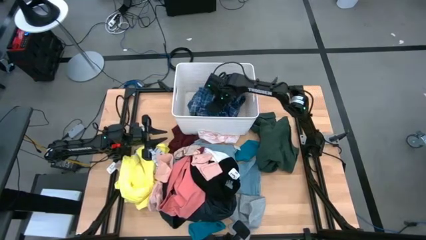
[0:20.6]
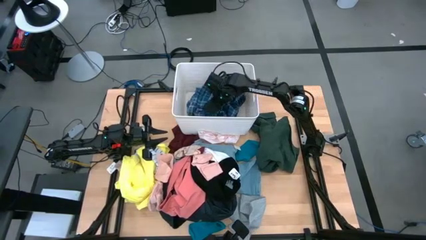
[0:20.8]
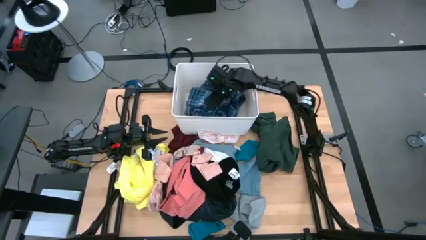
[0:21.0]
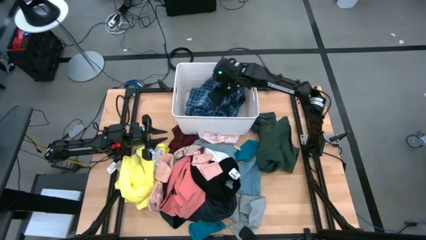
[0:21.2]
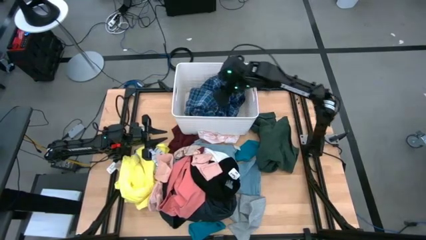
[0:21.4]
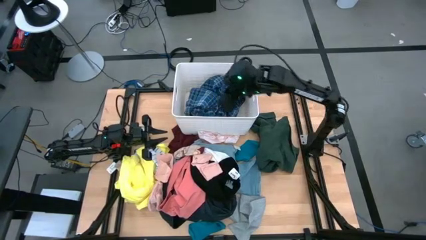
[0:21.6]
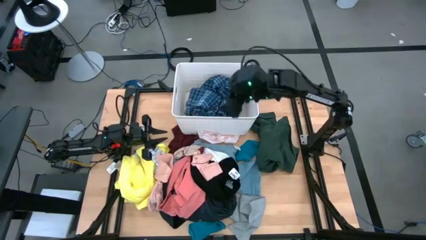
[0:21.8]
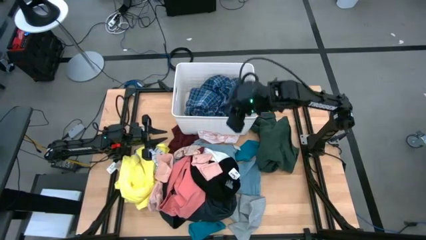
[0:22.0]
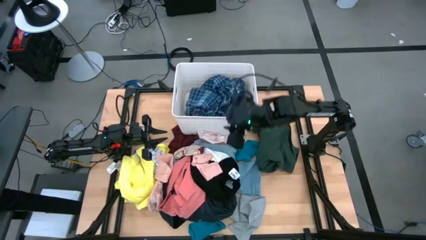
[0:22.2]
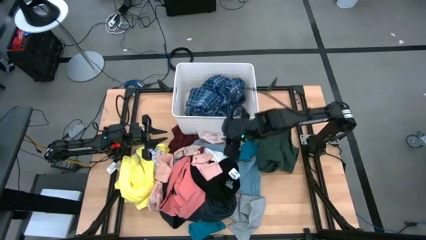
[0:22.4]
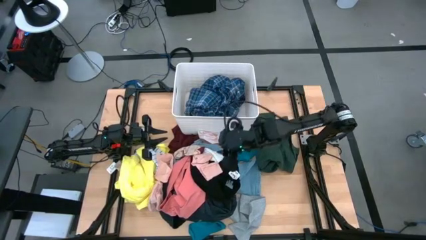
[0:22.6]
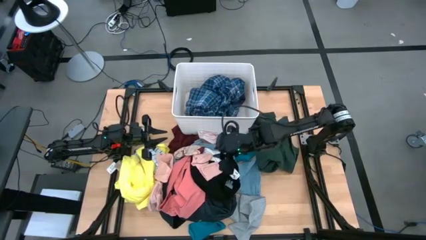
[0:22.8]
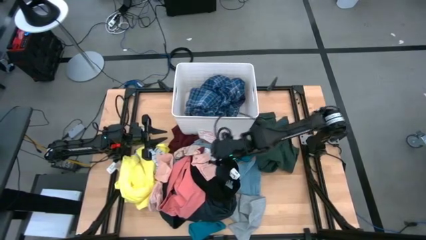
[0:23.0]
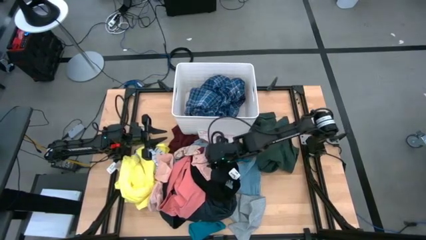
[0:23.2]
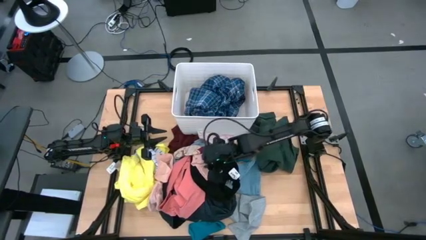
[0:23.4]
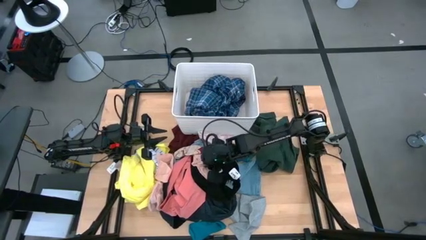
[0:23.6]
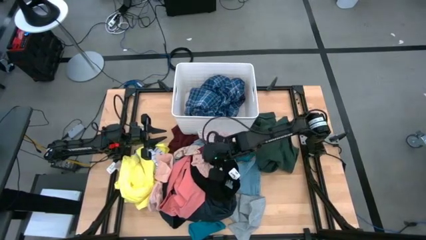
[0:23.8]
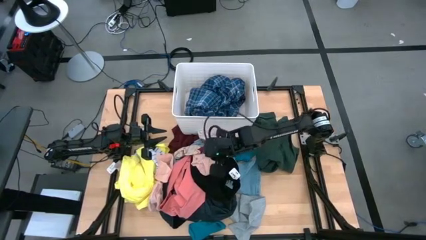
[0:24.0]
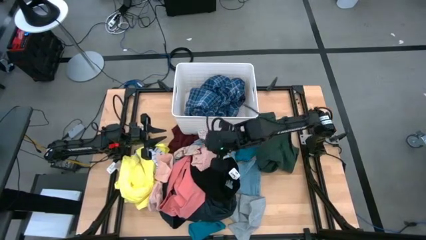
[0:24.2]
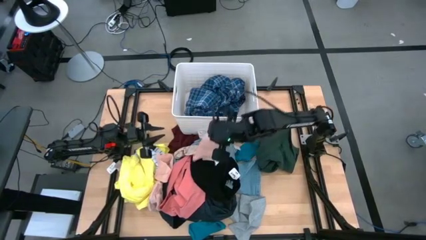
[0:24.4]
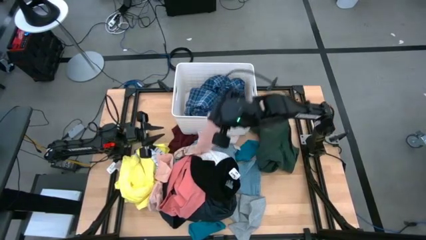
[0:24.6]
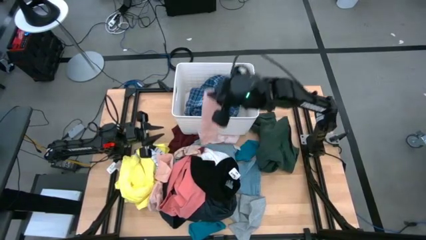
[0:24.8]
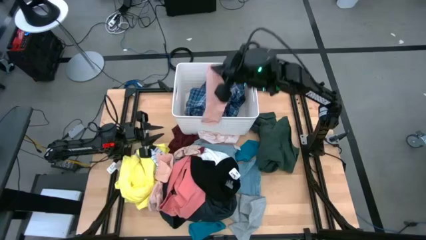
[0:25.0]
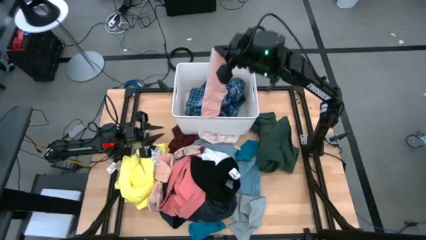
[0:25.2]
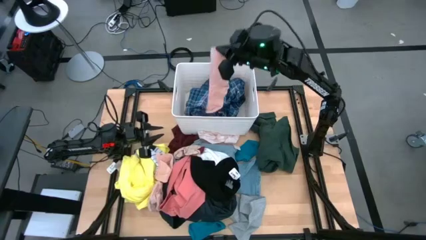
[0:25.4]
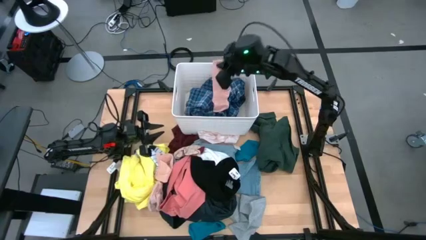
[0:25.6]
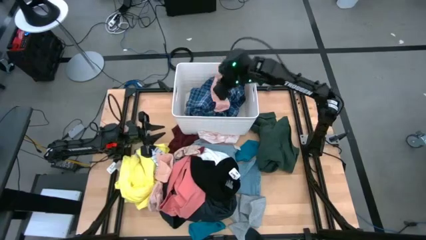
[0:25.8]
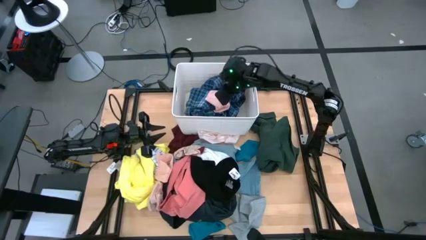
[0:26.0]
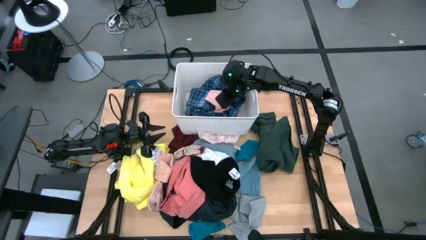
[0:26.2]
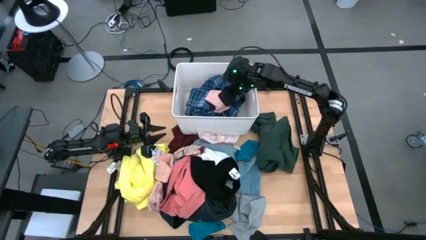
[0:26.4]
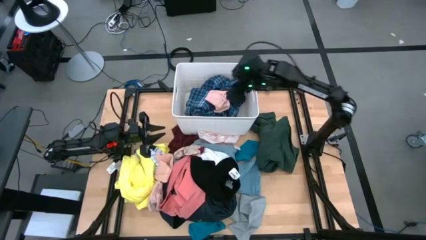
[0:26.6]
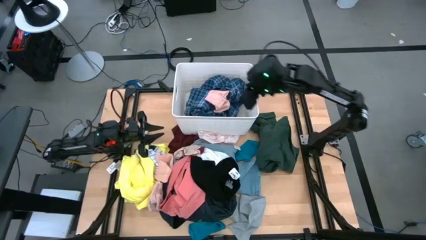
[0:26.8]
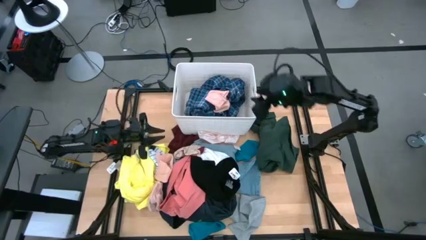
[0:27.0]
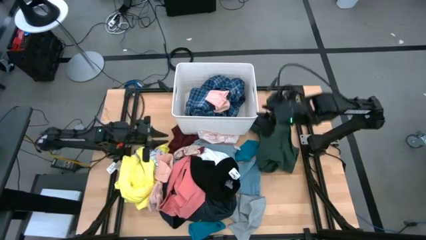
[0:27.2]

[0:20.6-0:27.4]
Task: Sort clothes
Put the right pink sock into the white laundry bin

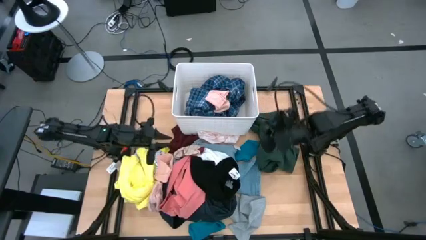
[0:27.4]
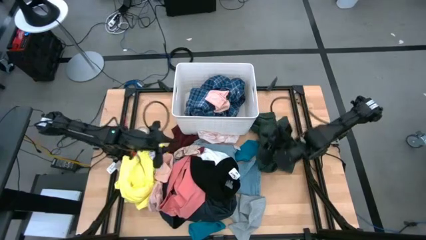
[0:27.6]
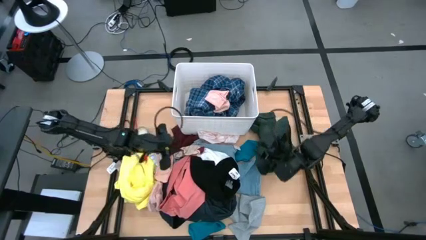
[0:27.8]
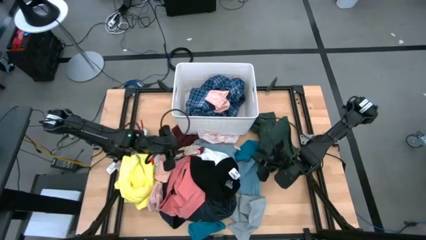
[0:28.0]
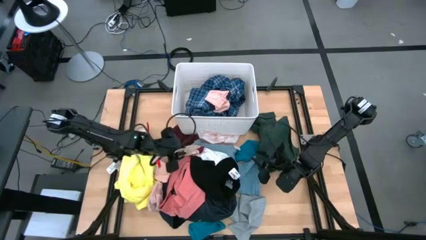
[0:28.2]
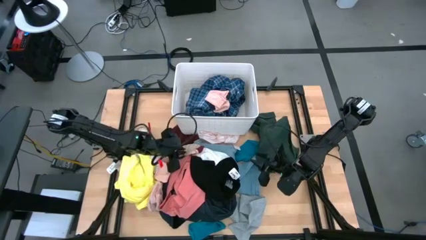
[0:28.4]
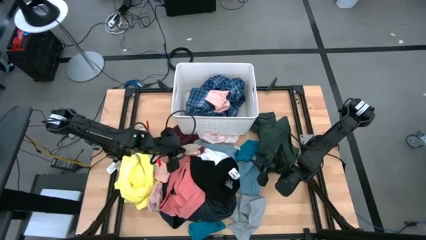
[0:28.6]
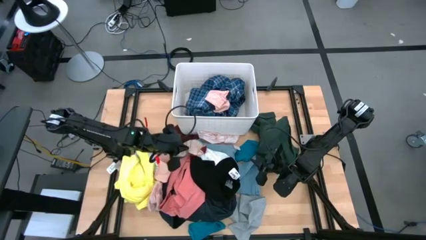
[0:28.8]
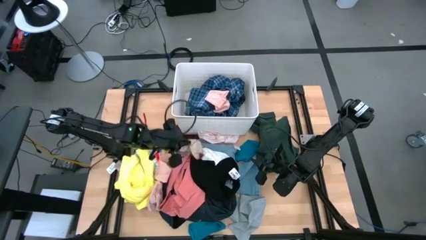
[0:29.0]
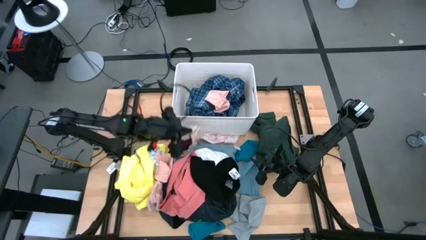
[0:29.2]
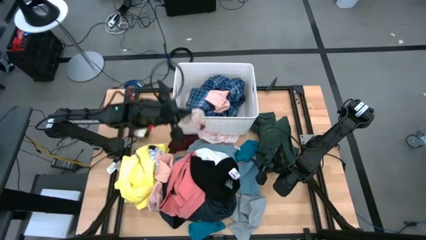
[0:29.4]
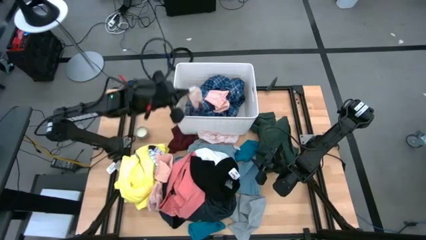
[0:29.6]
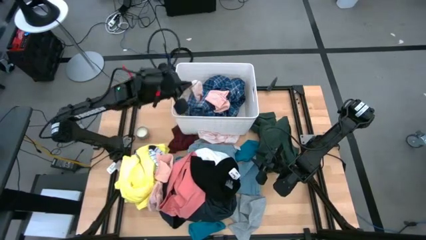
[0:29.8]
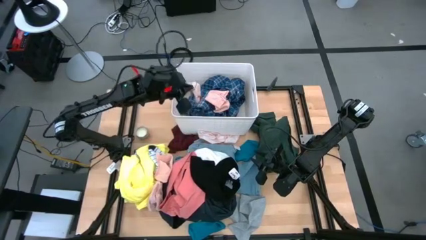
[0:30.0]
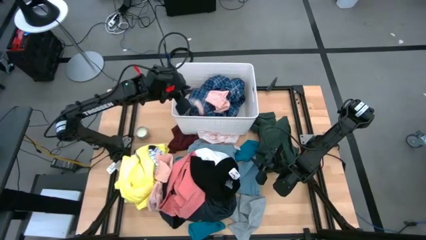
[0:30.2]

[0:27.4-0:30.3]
Put the right white striped sock into the white laundry bin

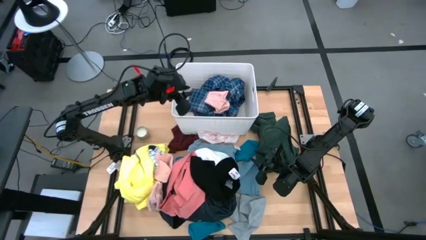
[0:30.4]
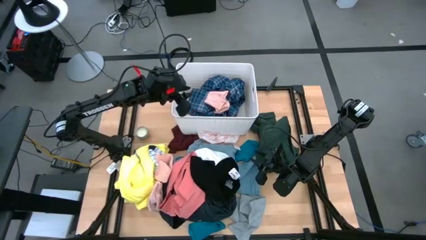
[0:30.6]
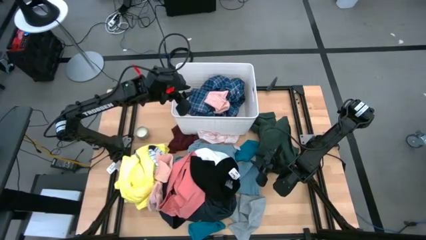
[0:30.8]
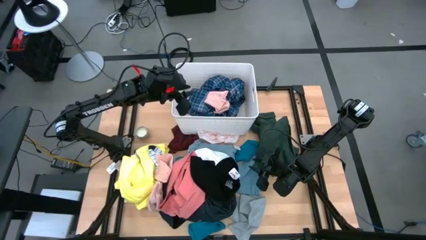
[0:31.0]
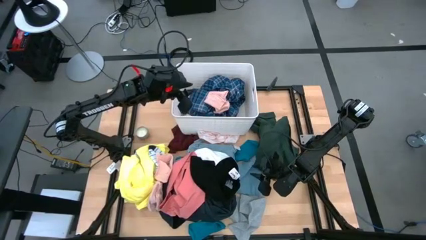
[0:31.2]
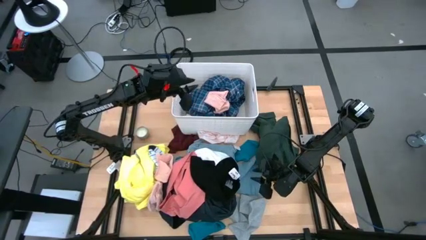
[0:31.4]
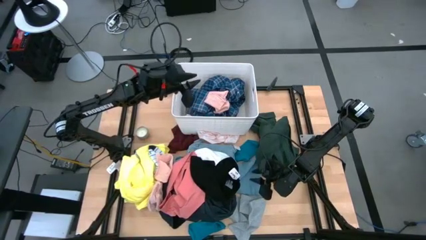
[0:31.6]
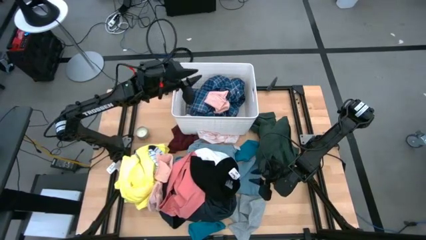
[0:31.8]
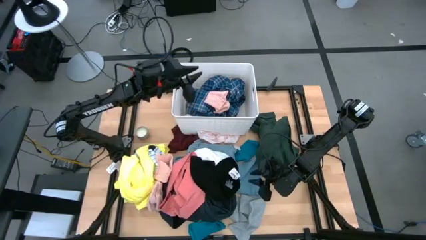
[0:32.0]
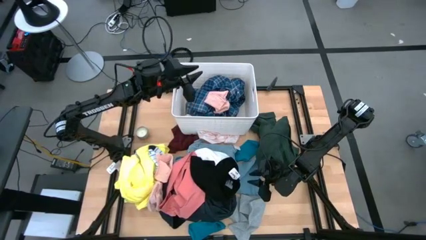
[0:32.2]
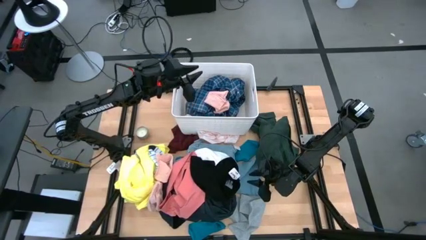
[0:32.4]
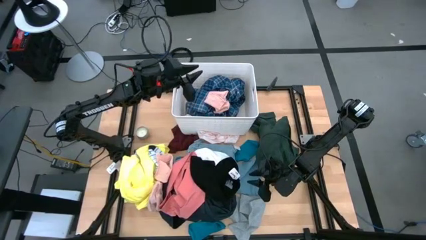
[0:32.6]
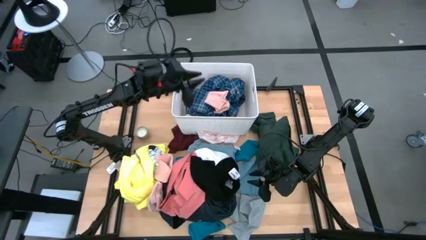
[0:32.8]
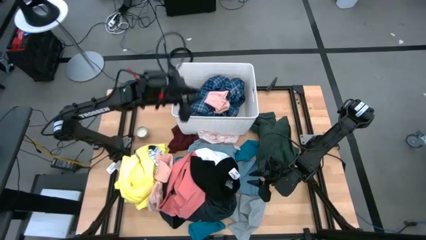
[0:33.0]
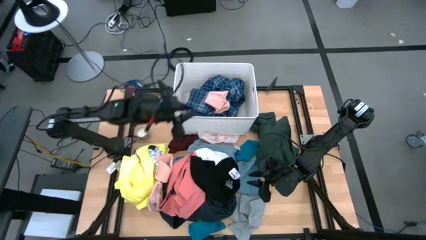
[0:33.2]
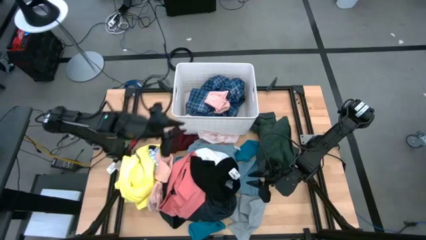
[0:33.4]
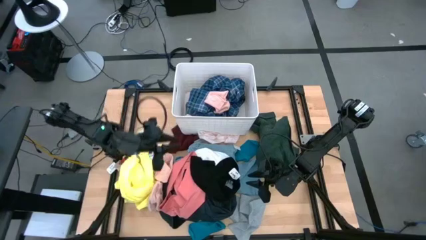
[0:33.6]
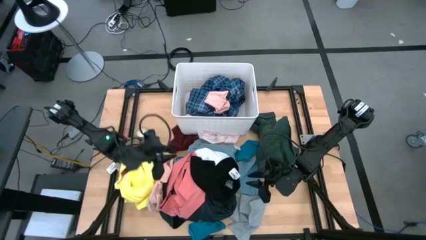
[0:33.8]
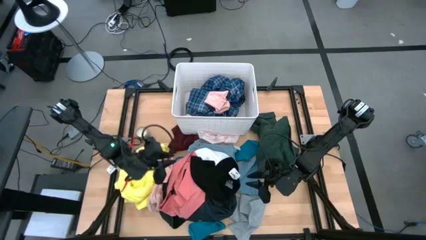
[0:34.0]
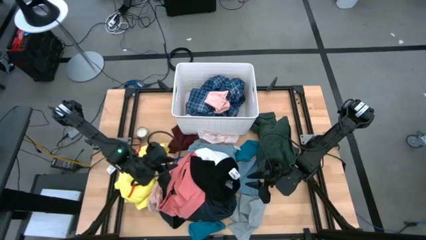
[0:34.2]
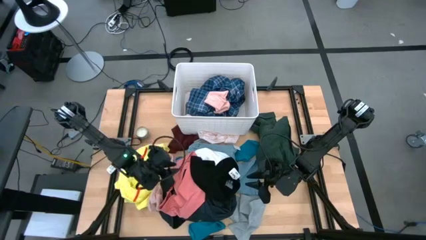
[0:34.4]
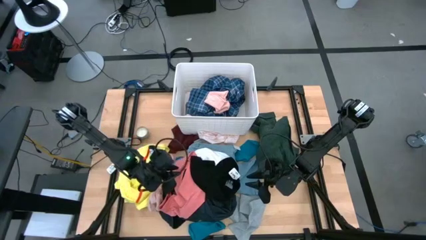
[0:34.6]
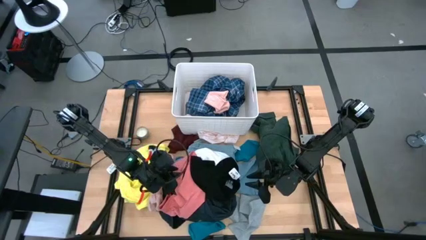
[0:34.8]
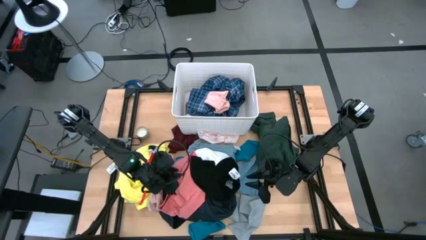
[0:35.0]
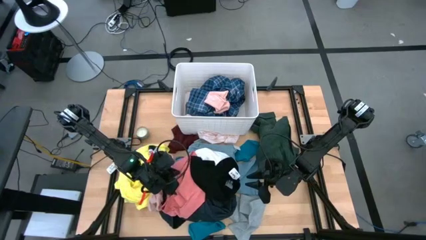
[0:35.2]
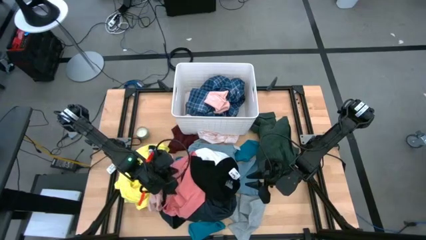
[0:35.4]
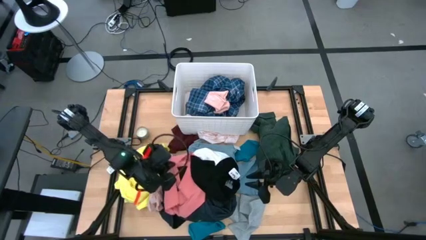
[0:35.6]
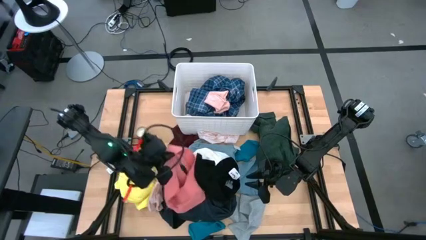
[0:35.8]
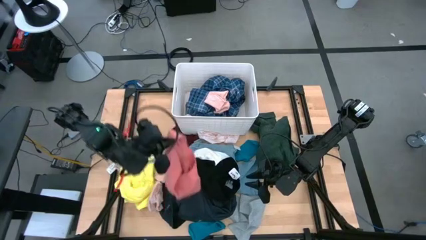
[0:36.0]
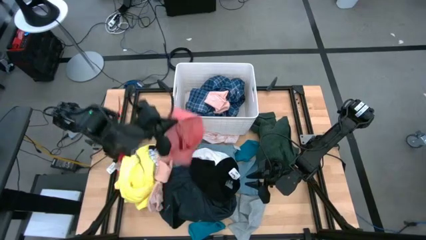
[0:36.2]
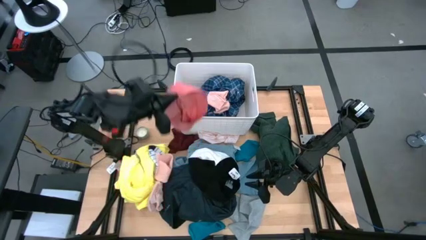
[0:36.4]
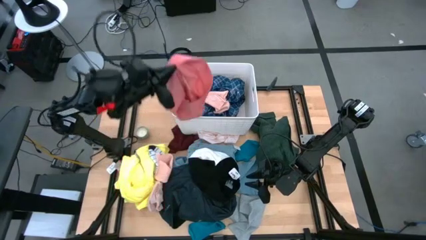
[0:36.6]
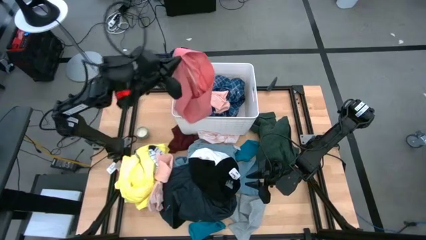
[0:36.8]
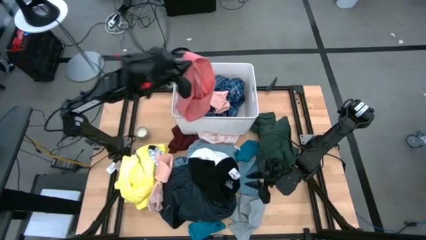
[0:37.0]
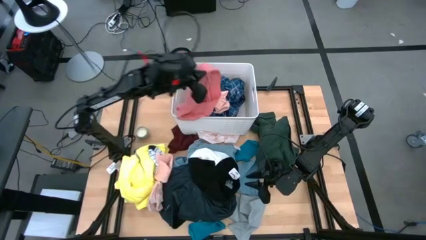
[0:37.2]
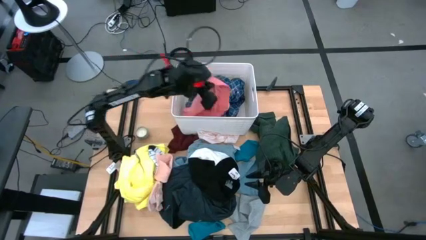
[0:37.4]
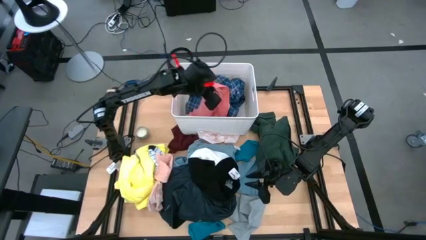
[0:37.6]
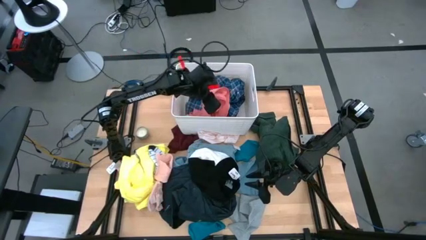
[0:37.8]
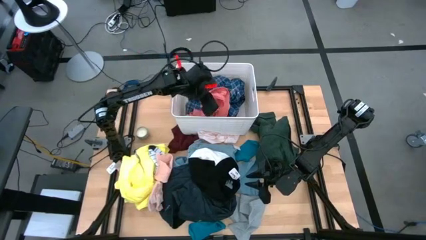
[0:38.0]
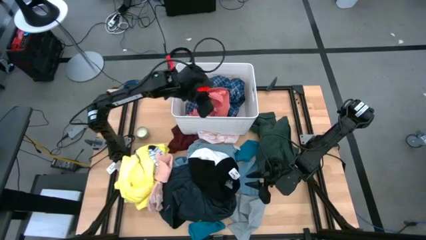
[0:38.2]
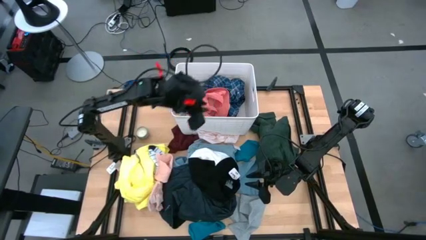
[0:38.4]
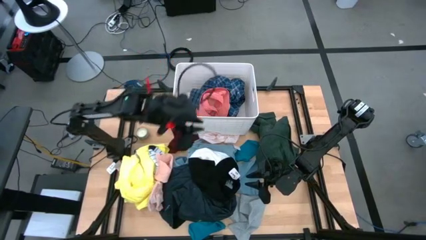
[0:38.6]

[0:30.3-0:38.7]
Put the pink underwear into the white laundry bin
